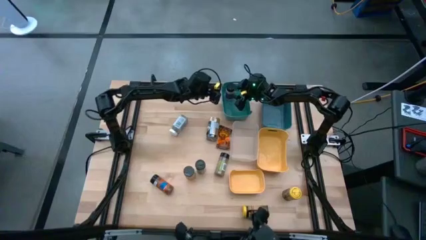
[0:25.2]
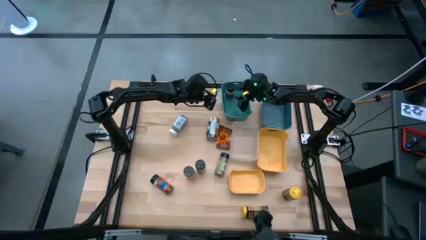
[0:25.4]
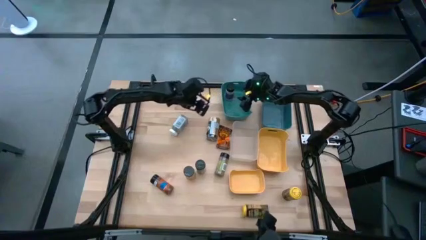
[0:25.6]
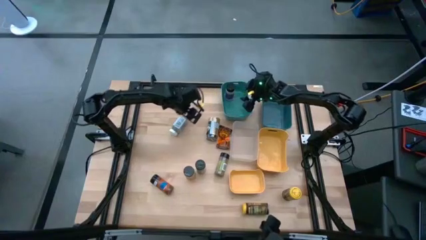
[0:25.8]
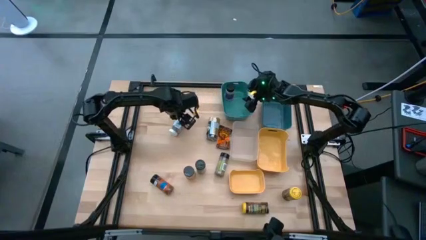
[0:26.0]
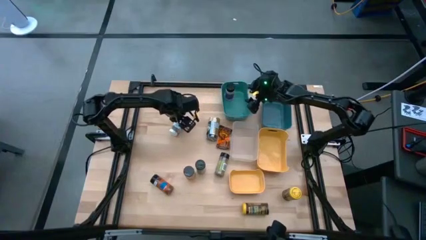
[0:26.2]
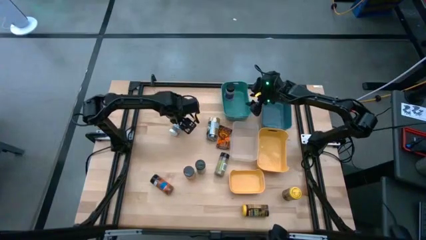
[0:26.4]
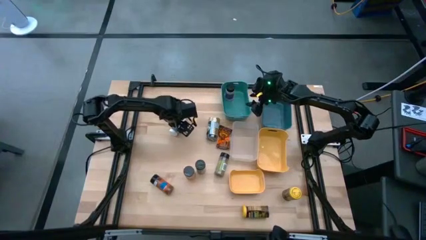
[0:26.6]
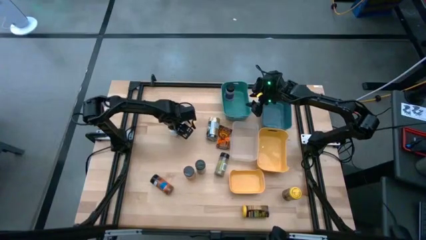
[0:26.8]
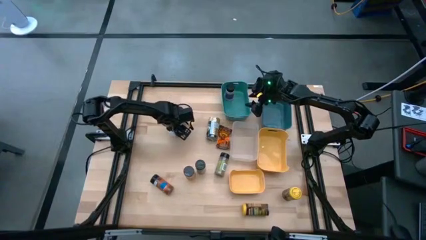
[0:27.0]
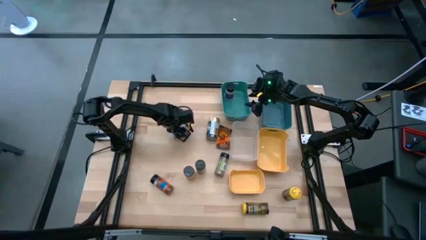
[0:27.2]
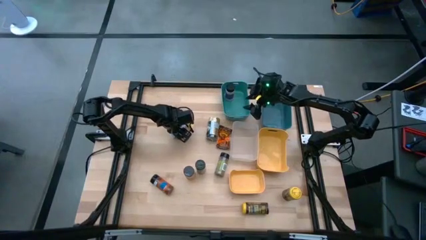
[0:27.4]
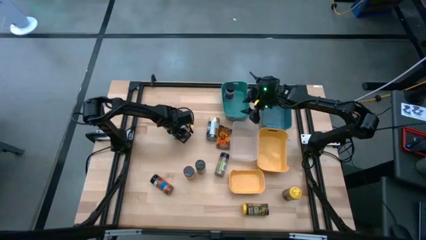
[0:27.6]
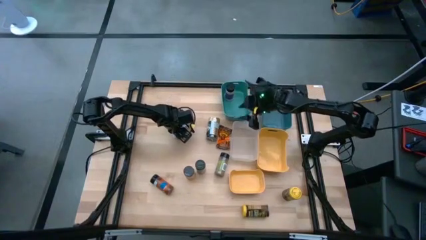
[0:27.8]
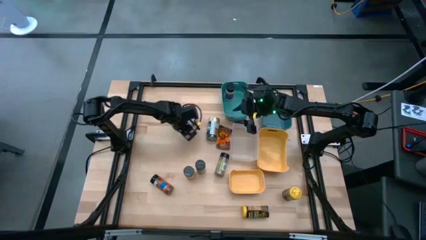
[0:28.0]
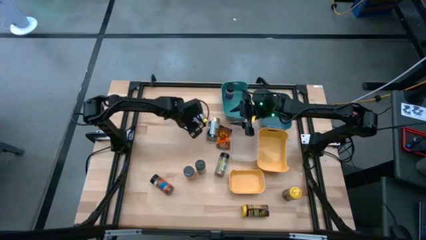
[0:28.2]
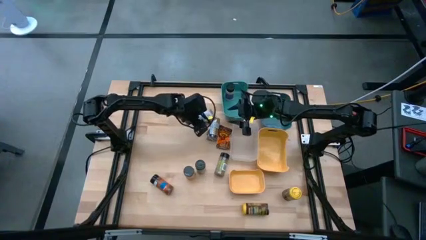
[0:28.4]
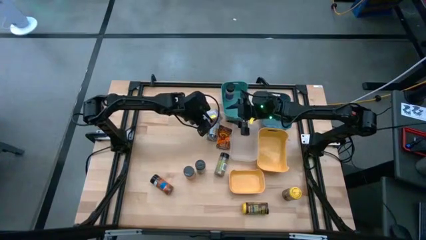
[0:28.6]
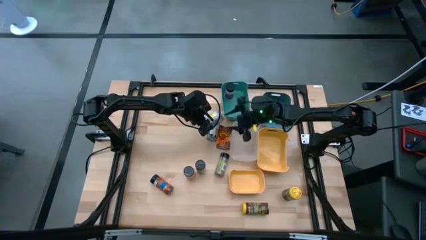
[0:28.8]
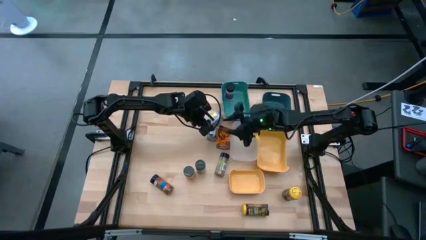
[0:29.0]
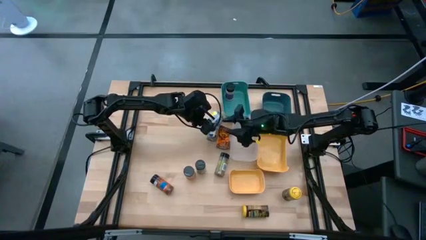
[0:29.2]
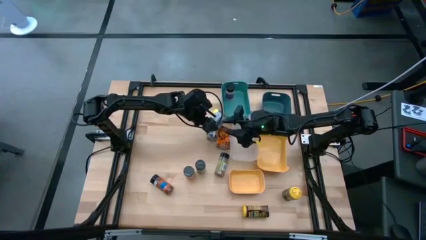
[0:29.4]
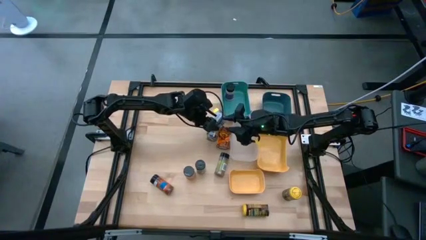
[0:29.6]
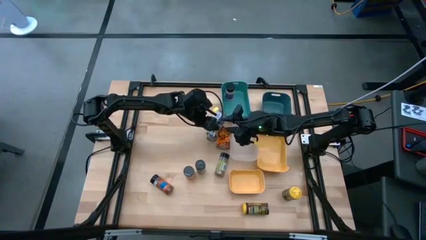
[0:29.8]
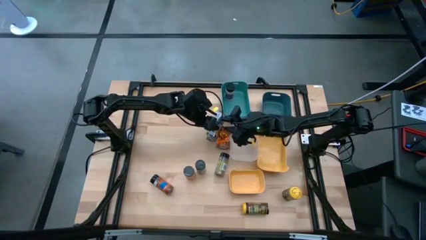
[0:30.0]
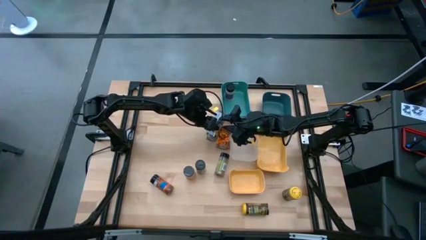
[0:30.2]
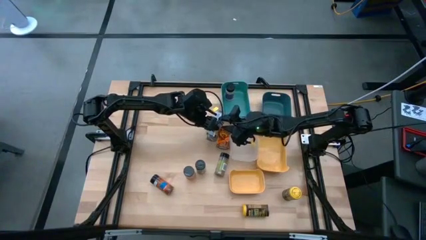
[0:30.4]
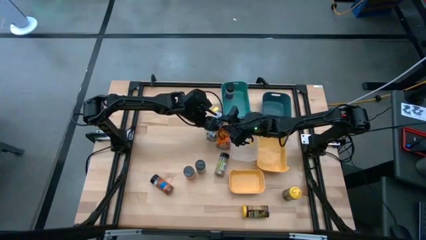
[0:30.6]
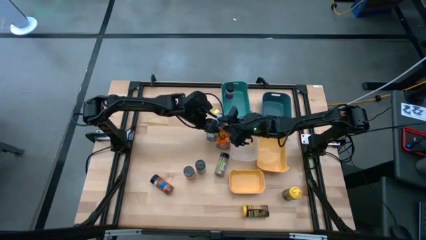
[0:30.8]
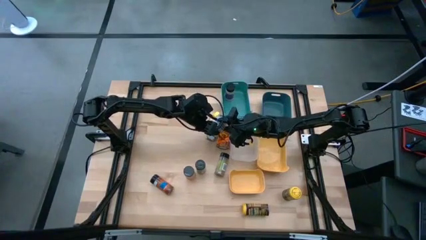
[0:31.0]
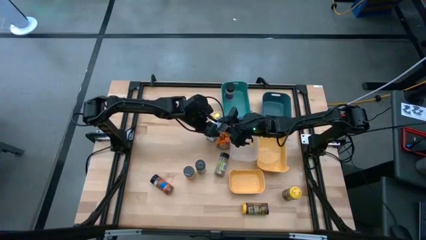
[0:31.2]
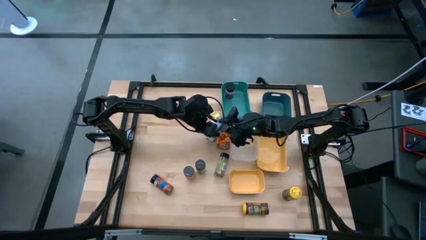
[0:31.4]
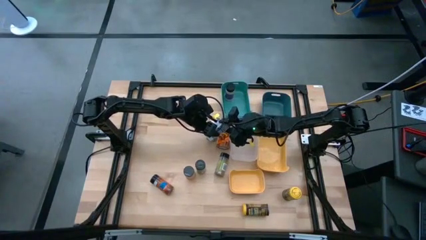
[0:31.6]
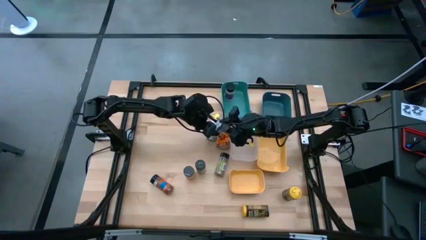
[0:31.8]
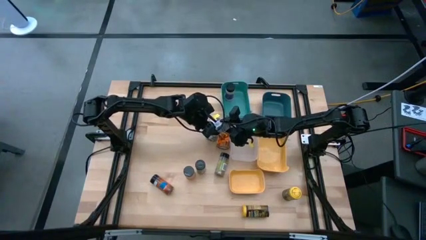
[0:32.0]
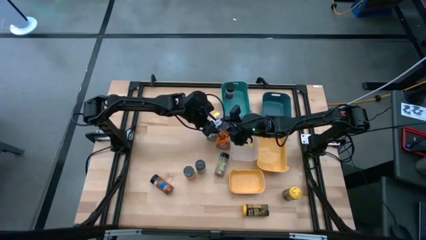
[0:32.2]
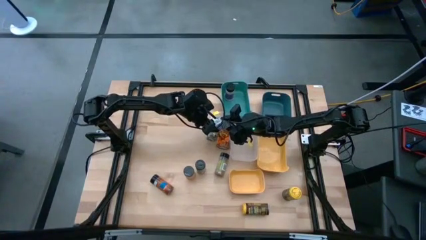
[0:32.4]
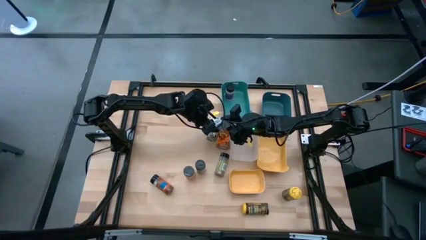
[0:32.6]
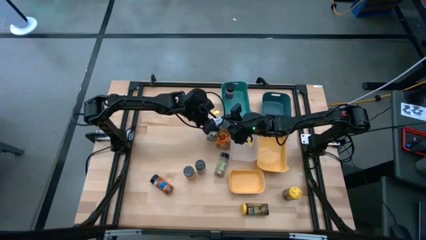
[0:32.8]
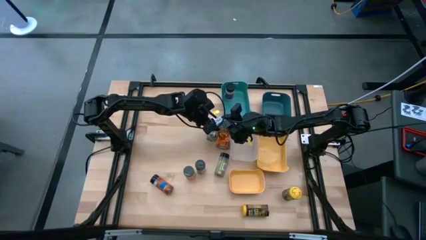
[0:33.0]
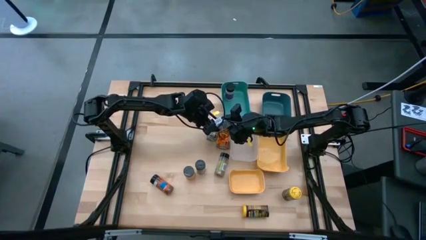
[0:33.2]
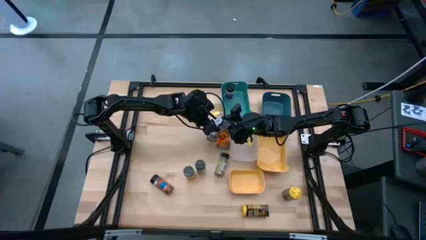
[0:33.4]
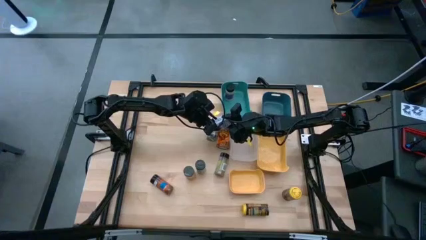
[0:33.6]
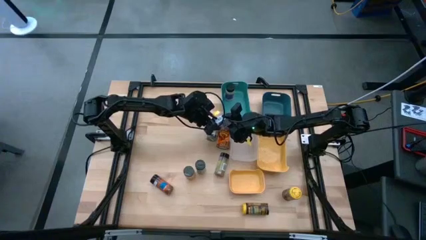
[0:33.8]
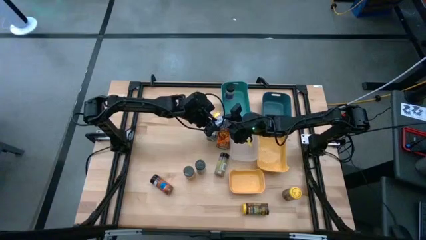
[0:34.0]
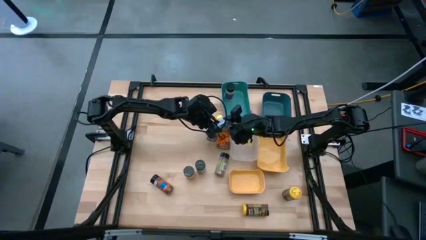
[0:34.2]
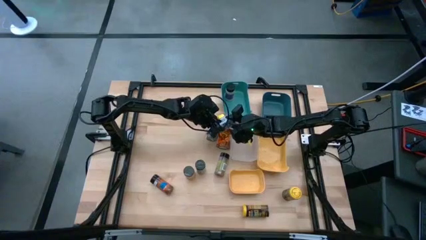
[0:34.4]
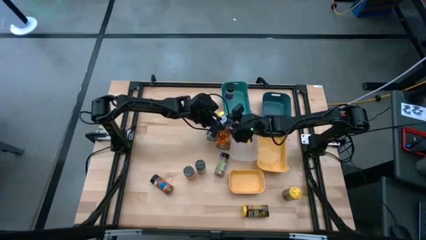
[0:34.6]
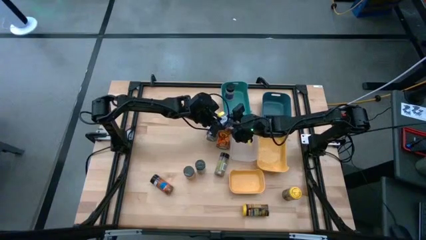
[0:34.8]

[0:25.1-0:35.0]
Task: Sort spices by type
Put the white seasoning into the blue bin

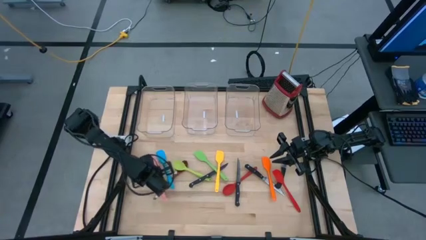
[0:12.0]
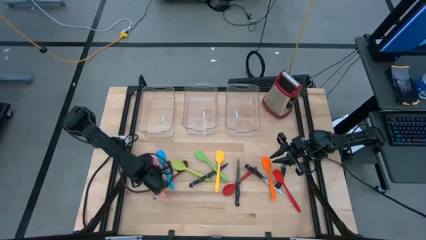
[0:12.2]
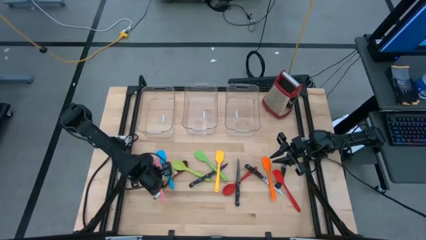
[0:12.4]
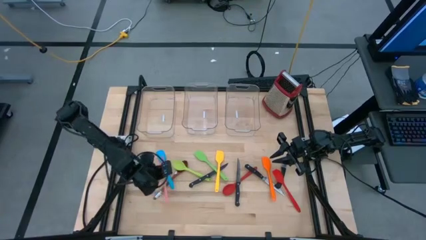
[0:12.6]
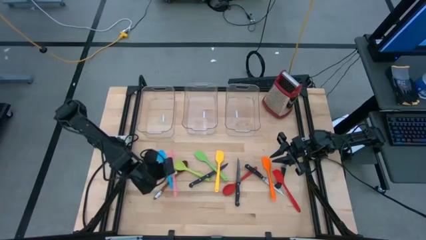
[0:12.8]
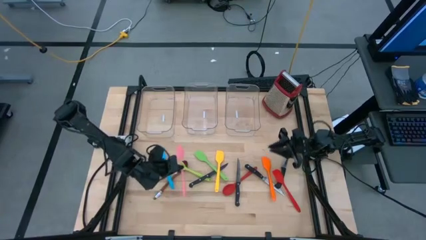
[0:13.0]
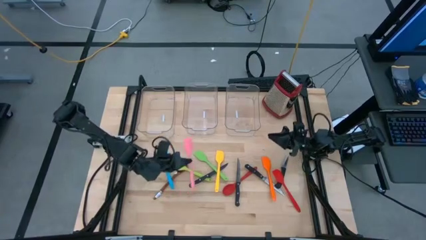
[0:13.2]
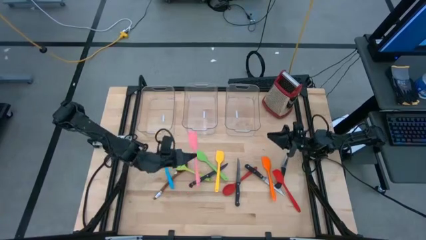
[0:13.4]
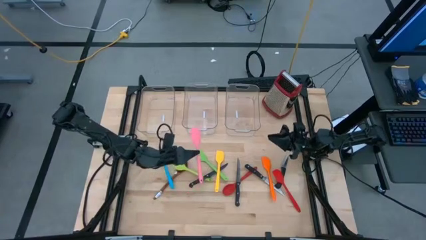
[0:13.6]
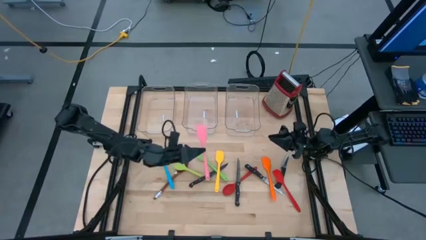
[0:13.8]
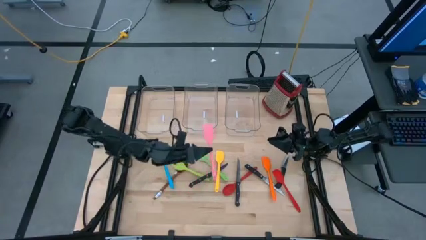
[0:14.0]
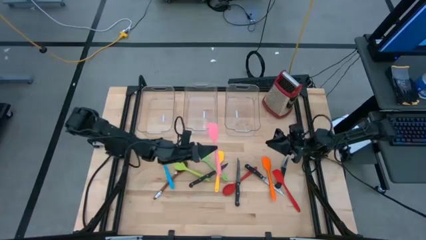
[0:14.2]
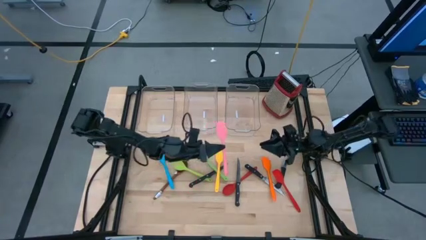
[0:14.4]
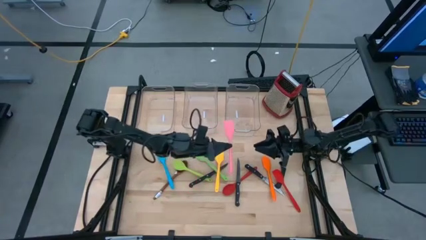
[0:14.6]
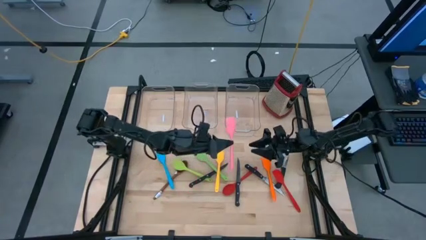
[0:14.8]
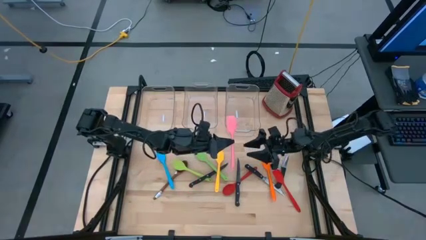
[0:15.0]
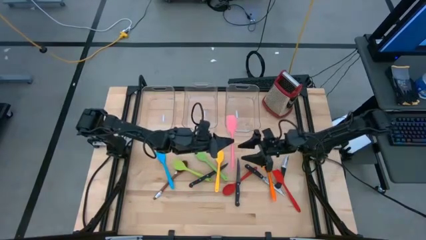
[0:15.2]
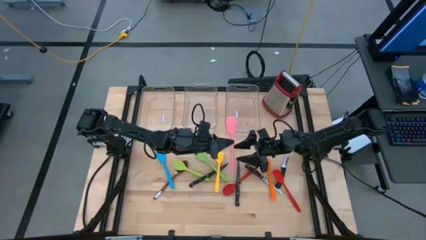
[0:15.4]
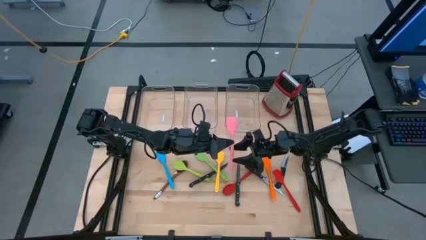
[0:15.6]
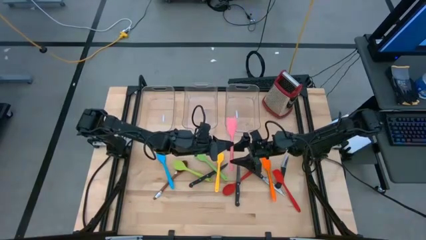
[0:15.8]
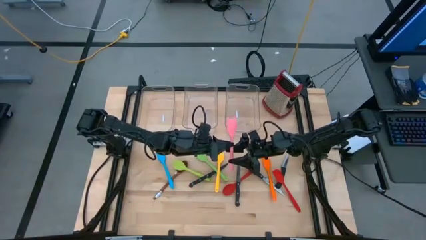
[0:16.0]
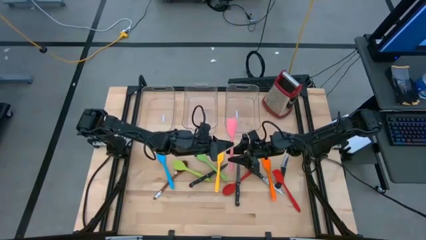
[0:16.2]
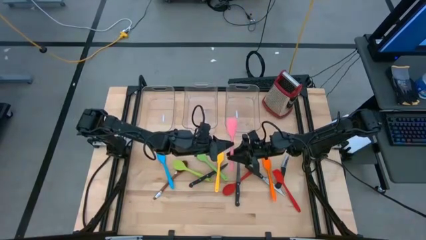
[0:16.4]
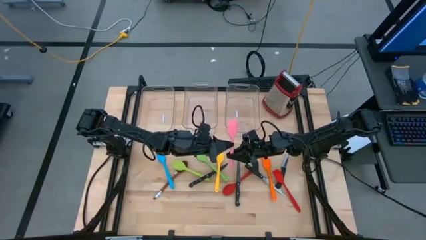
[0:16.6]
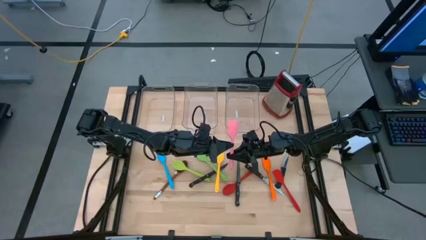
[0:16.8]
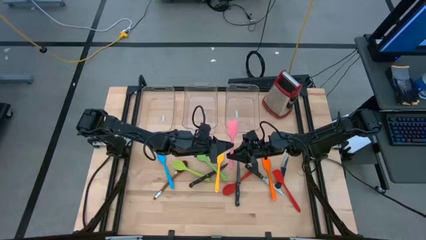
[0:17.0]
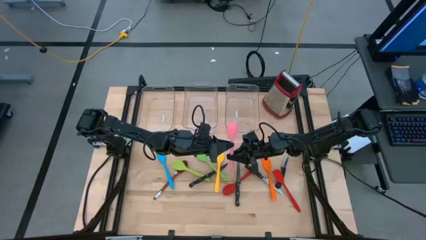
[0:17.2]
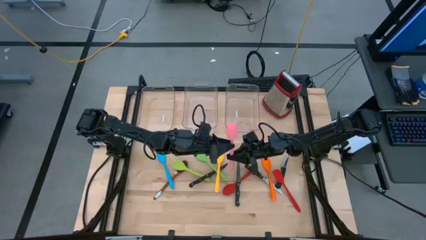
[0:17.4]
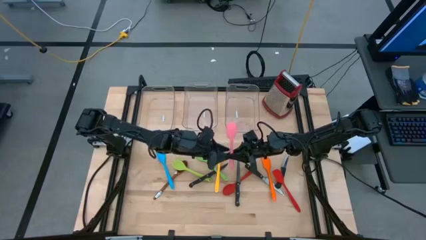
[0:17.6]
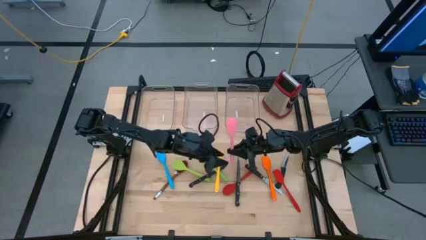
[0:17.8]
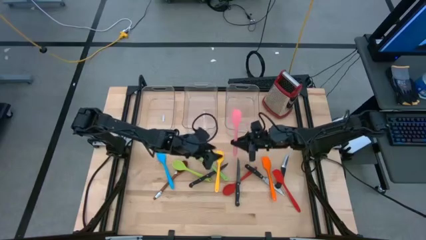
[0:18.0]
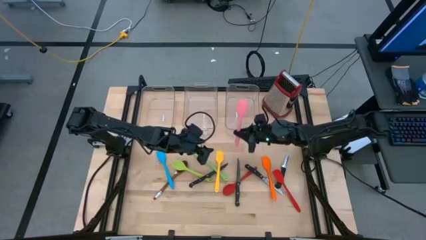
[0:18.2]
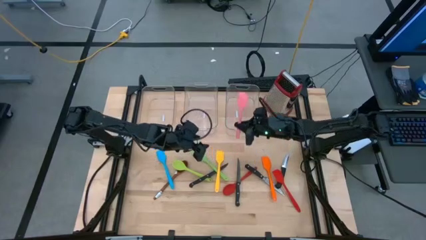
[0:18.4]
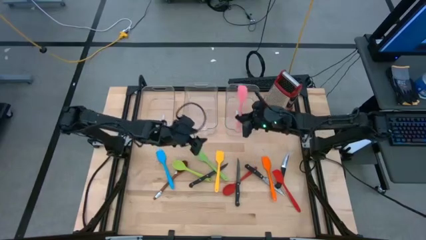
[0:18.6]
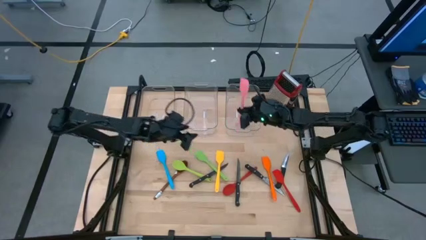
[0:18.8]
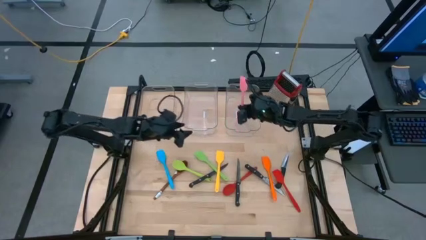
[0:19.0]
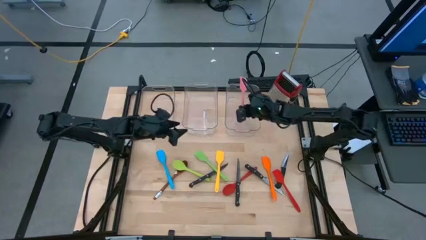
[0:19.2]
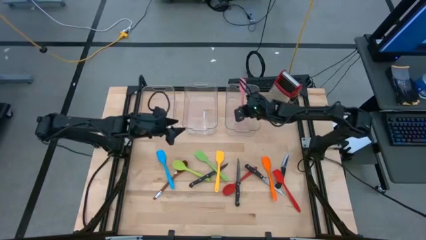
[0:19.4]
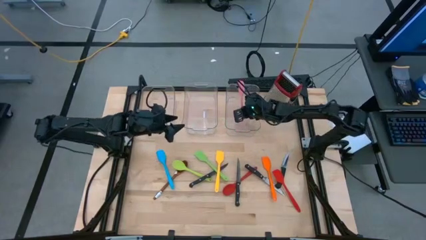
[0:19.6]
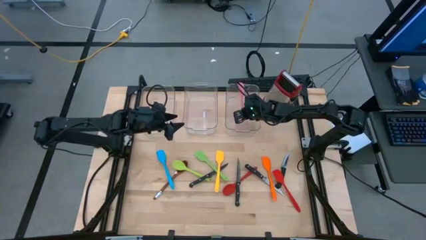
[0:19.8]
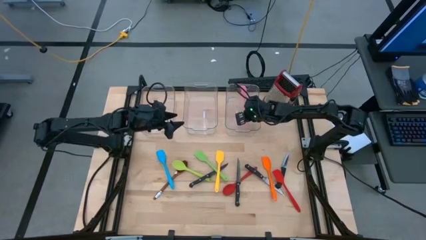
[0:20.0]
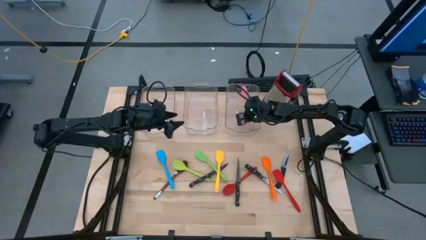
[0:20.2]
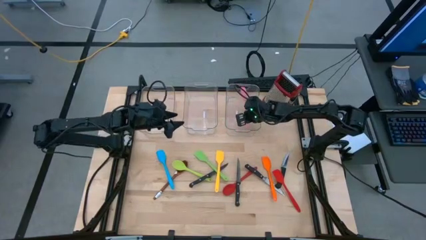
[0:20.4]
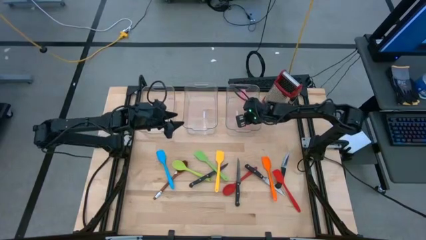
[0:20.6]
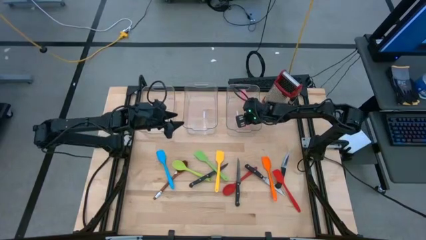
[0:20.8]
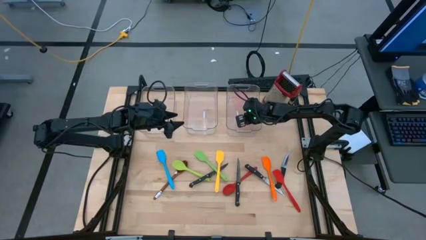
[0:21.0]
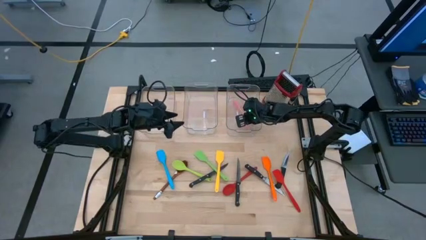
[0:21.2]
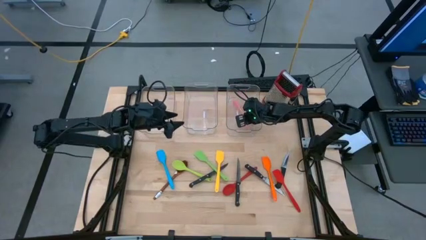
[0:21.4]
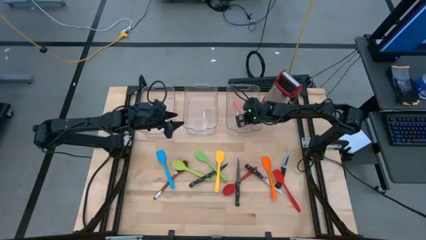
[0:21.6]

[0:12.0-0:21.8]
Task: Pick & Place Kitchen Items
Put the pink spatula into the right transparent bin
